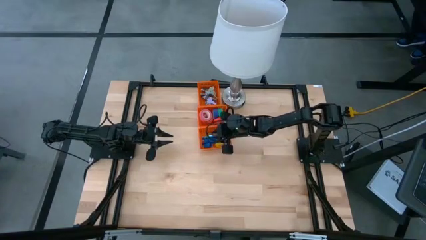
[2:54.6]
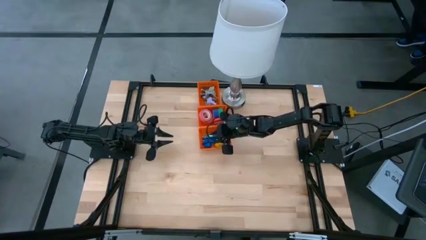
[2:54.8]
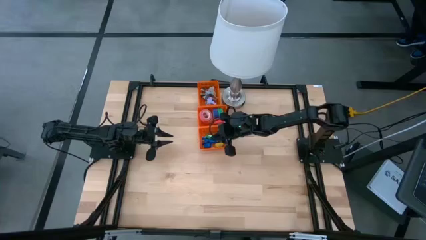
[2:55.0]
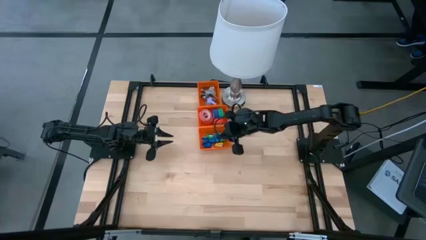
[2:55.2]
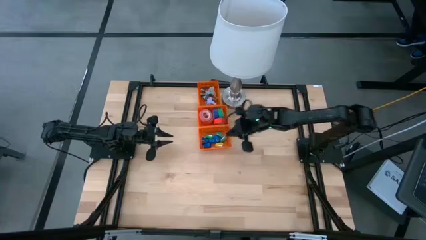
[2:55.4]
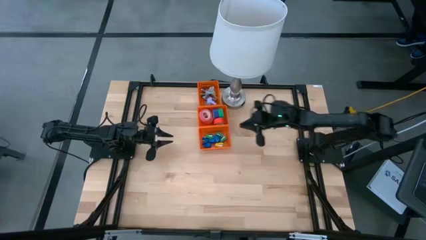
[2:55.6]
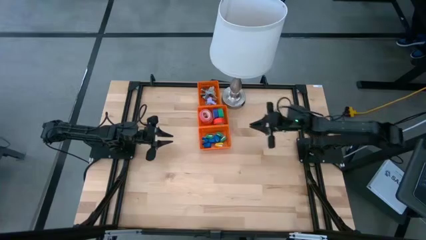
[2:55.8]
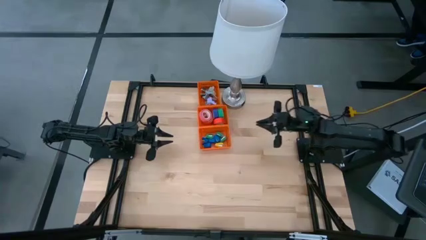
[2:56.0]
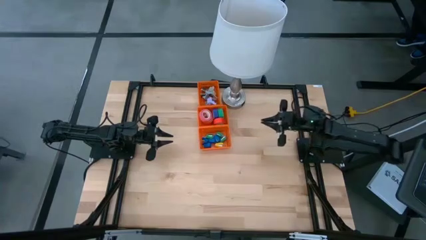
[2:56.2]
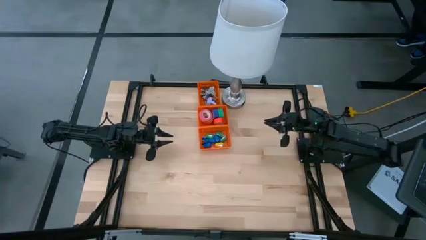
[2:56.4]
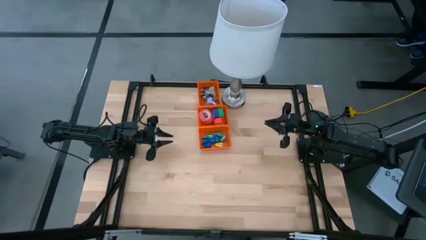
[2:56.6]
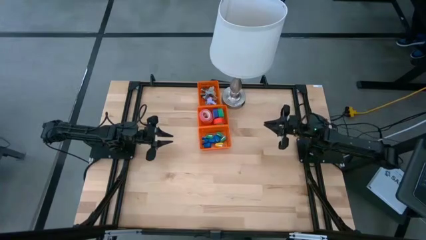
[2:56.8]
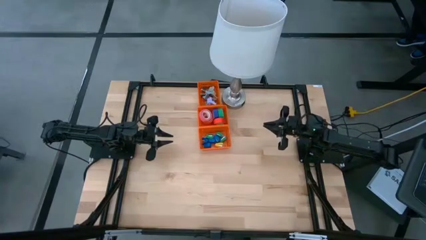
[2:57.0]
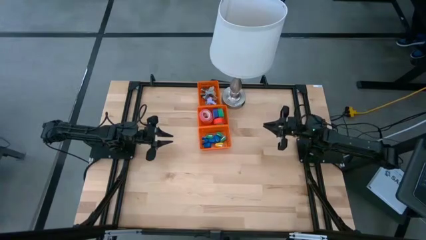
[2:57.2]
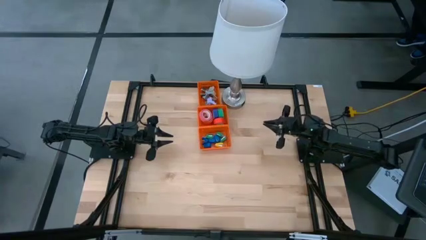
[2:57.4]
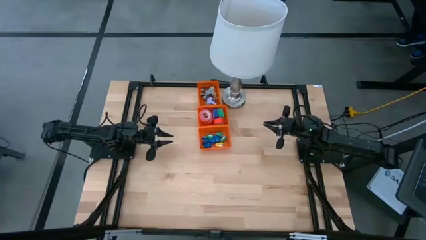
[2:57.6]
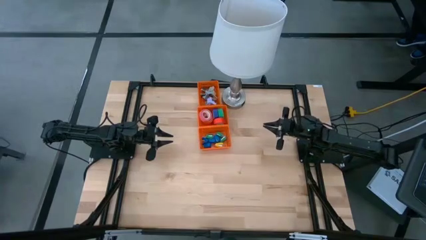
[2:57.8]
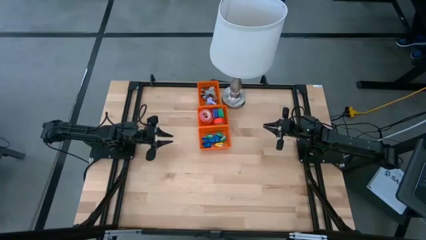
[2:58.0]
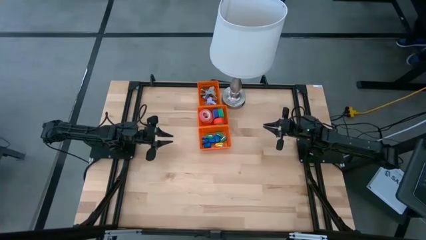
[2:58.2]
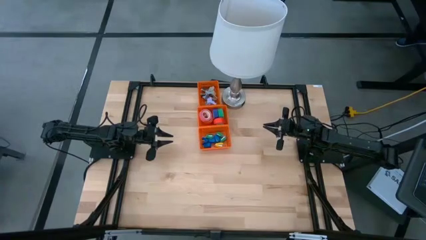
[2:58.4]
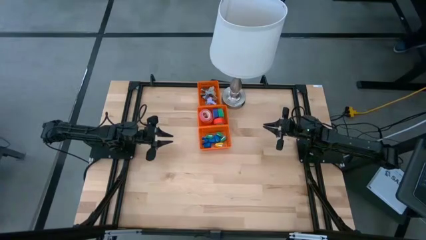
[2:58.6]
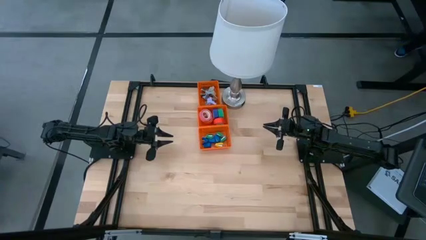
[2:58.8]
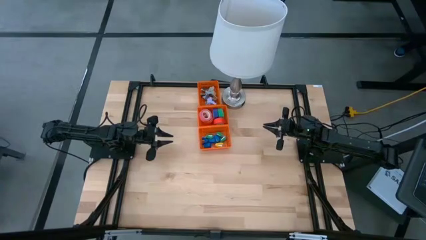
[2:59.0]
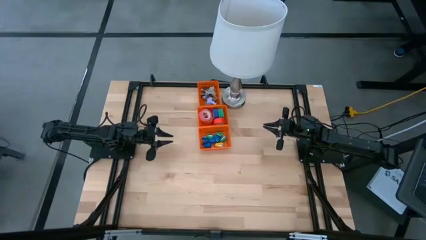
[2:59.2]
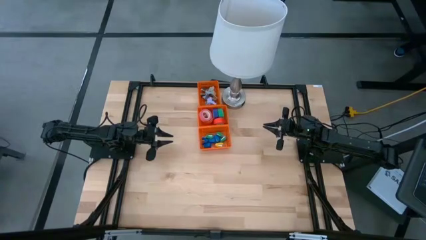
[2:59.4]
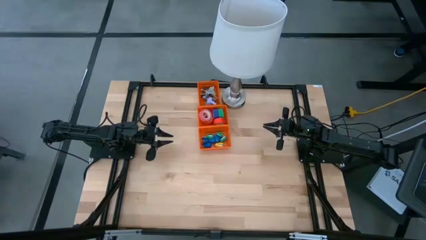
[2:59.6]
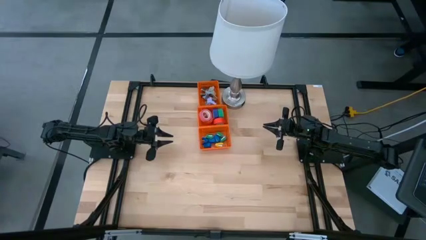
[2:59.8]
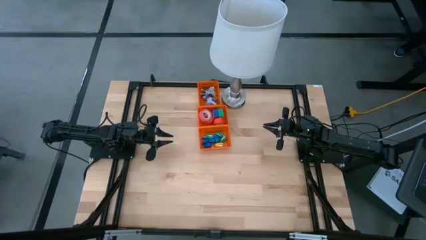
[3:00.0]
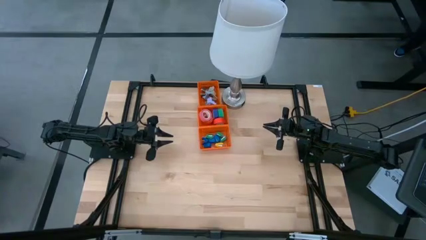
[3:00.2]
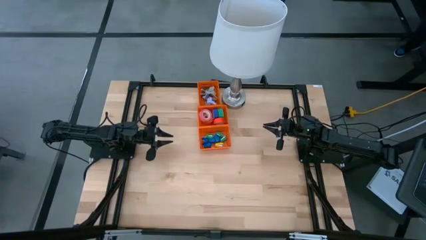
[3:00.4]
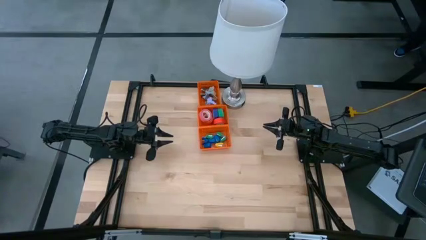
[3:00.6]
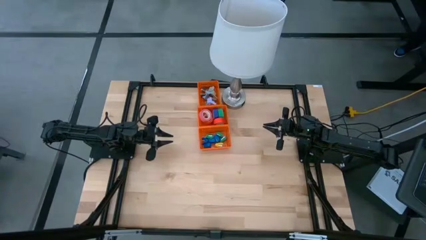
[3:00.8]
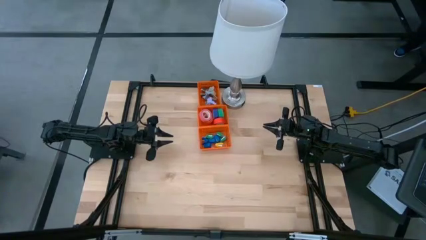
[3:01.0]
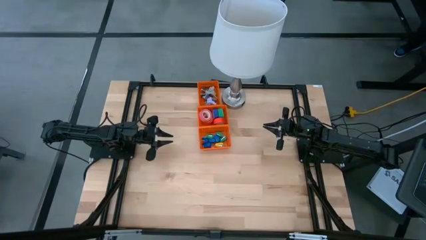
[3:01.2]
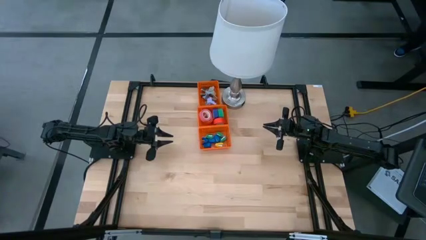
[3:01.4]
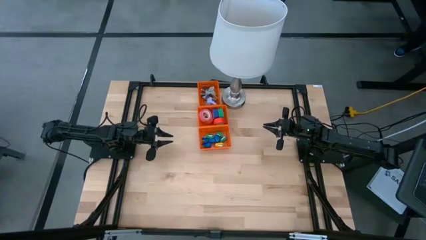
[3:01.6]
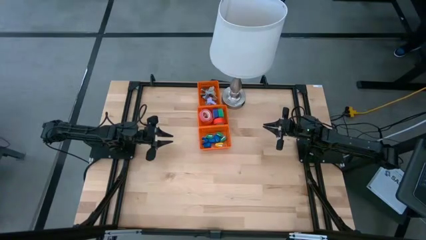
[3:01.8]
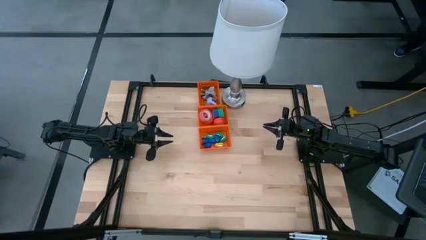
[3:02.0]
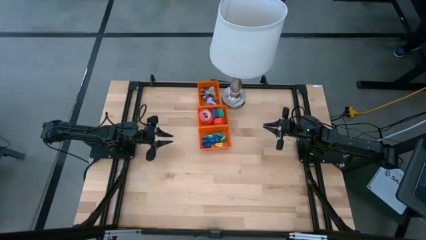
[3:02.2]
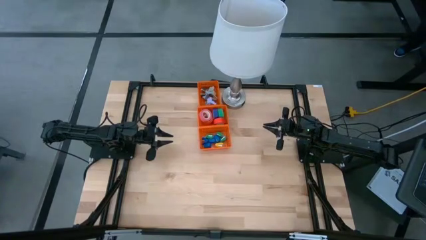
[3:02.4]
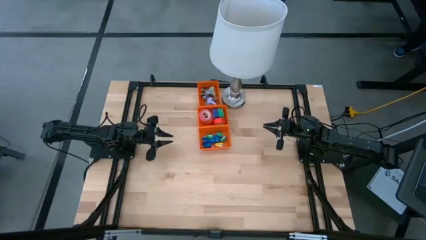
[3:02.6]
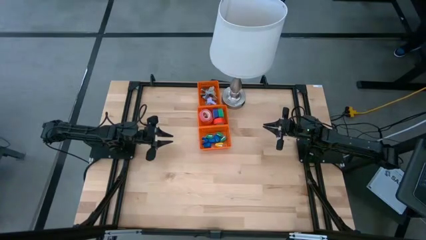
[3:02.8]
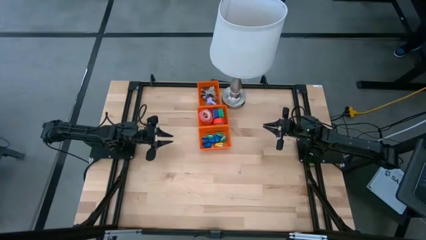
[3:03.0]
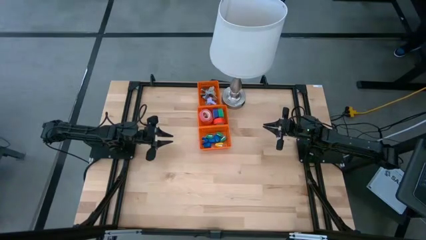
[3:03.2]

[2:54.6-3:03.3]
Task: Pick and place Stapler, Stapler remover, tape
Return to Home Position

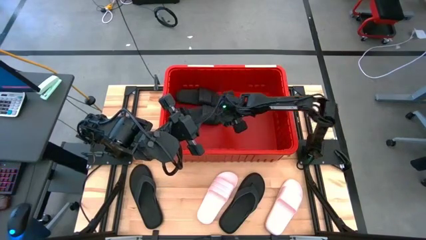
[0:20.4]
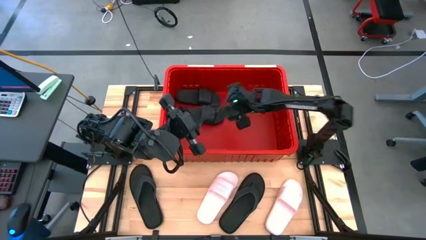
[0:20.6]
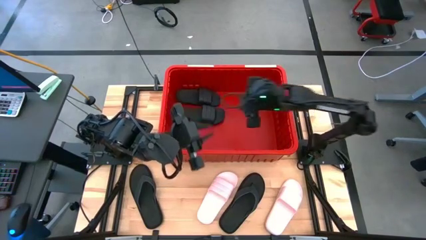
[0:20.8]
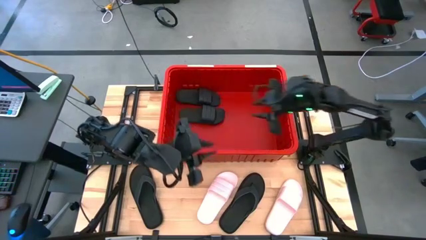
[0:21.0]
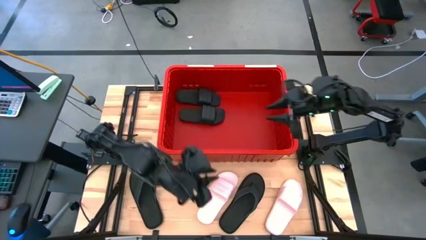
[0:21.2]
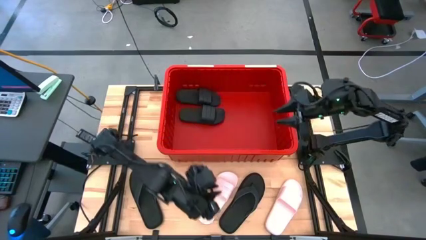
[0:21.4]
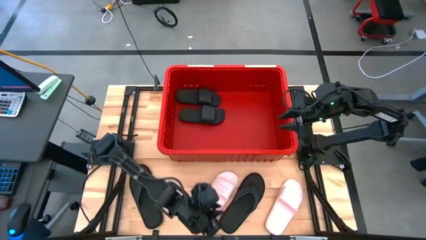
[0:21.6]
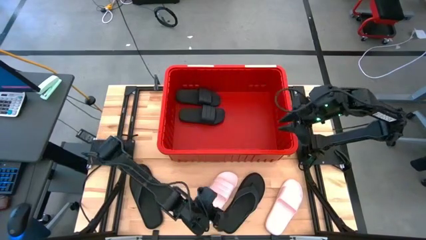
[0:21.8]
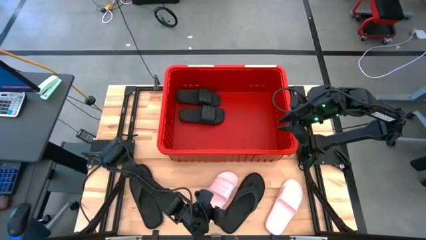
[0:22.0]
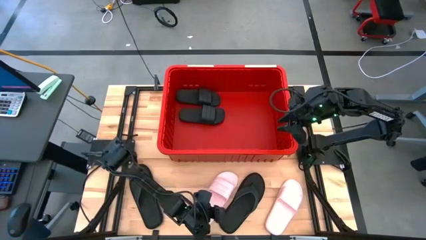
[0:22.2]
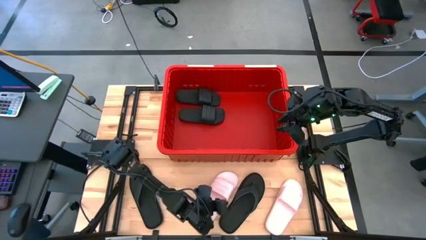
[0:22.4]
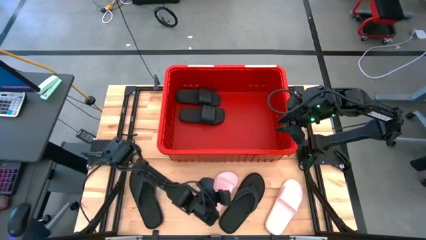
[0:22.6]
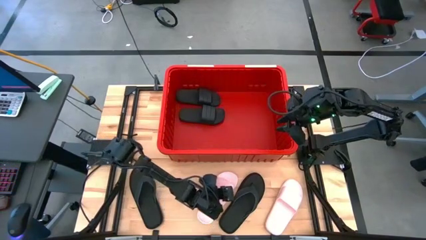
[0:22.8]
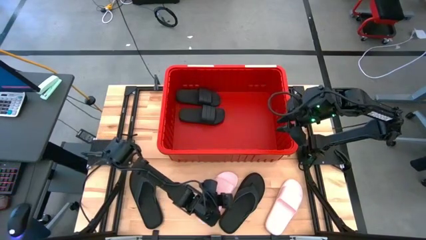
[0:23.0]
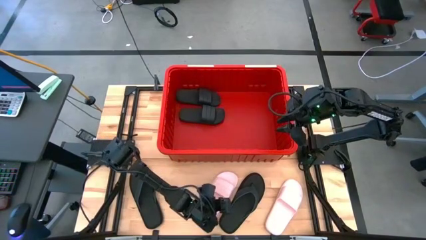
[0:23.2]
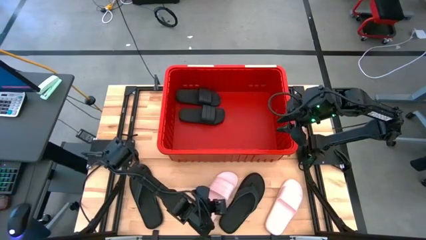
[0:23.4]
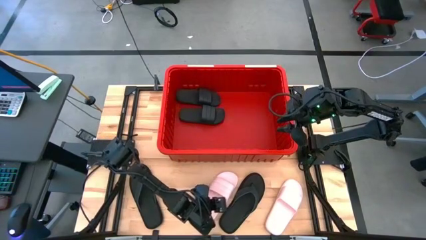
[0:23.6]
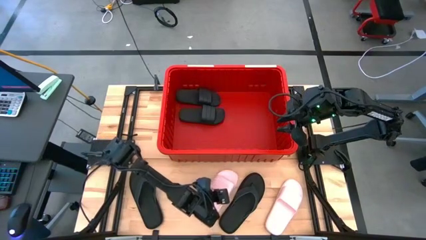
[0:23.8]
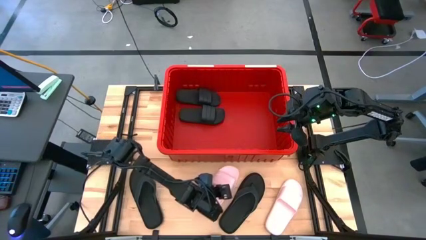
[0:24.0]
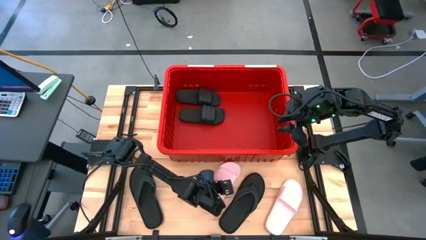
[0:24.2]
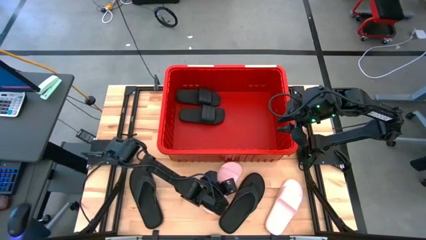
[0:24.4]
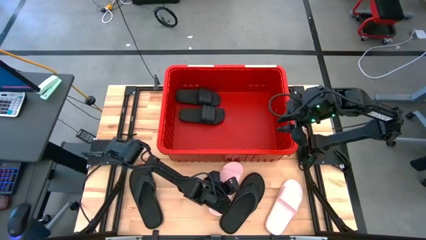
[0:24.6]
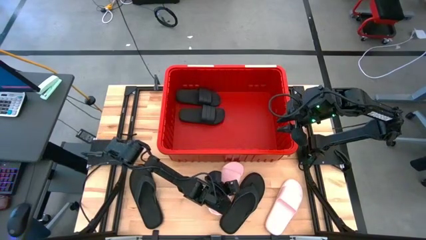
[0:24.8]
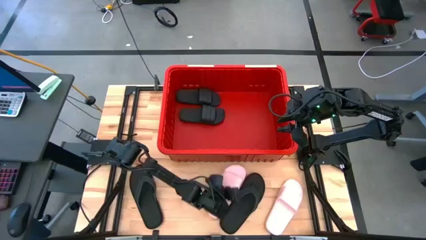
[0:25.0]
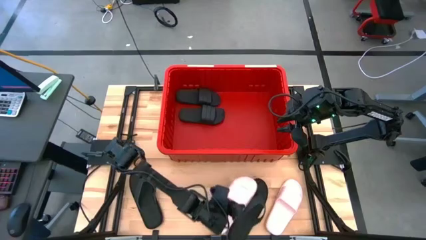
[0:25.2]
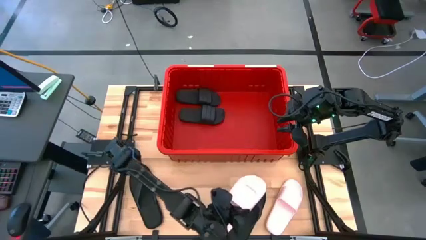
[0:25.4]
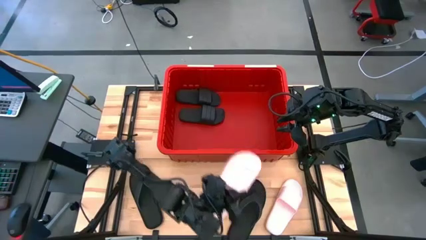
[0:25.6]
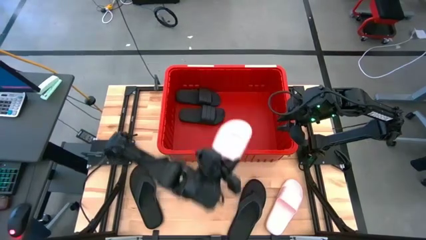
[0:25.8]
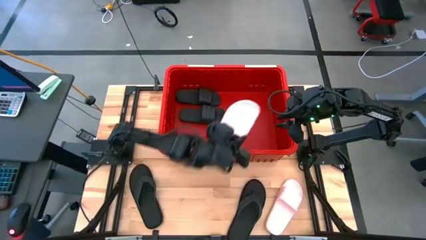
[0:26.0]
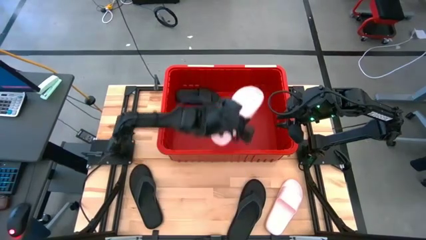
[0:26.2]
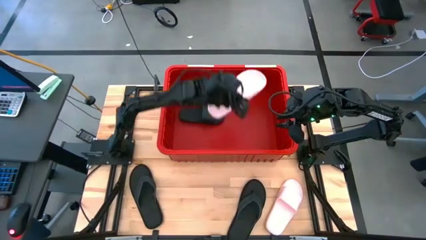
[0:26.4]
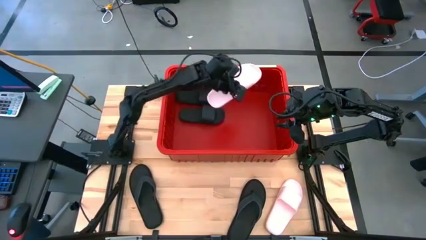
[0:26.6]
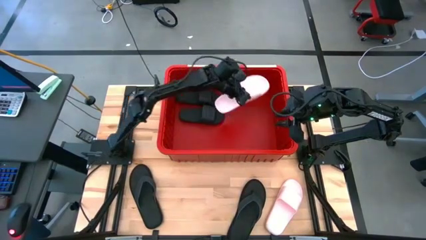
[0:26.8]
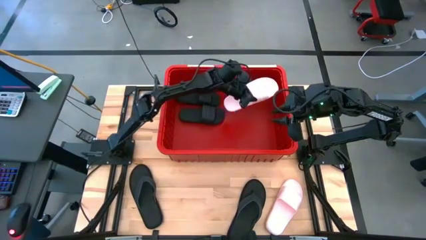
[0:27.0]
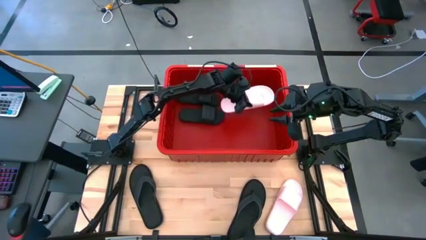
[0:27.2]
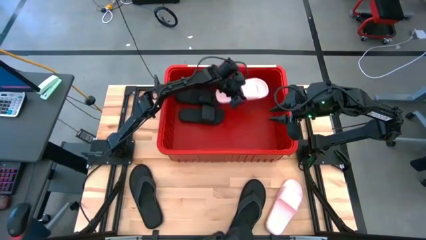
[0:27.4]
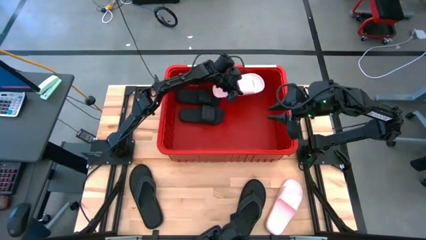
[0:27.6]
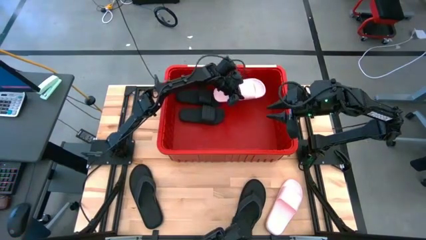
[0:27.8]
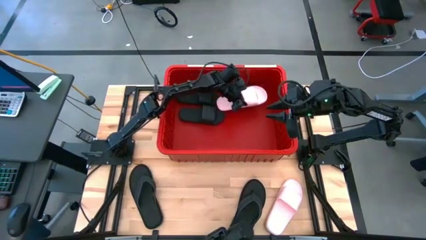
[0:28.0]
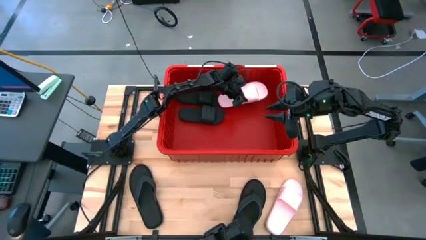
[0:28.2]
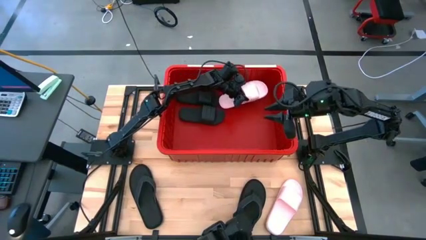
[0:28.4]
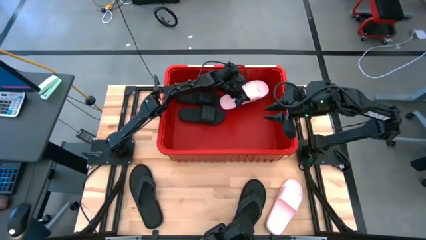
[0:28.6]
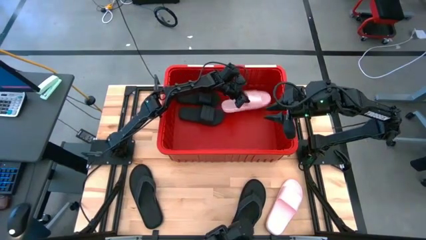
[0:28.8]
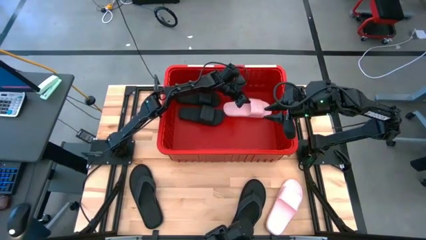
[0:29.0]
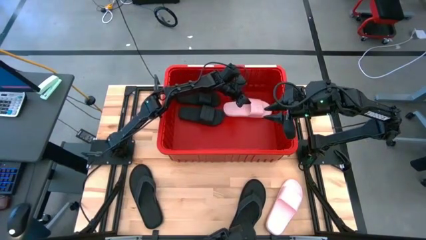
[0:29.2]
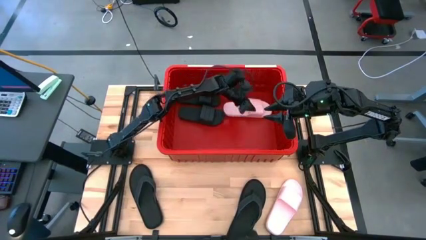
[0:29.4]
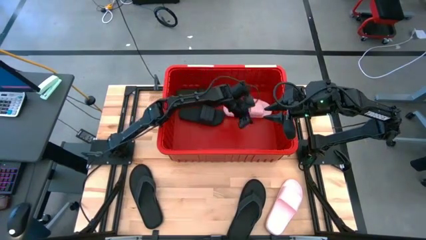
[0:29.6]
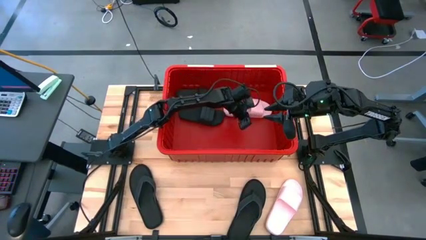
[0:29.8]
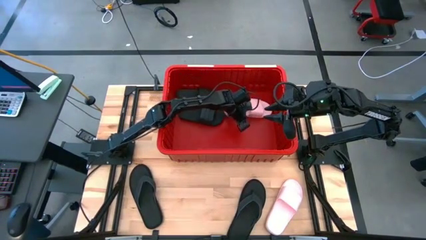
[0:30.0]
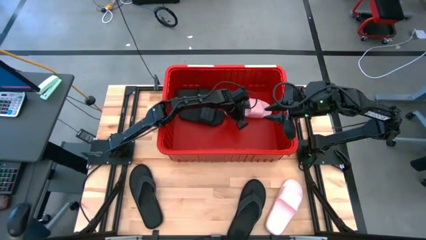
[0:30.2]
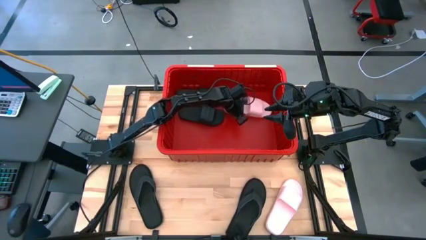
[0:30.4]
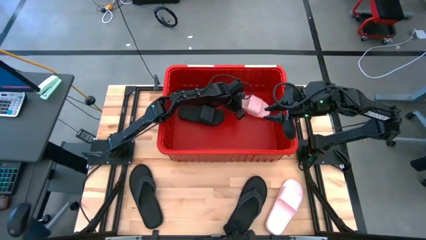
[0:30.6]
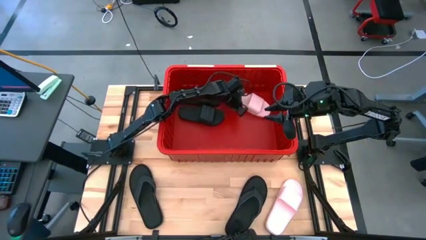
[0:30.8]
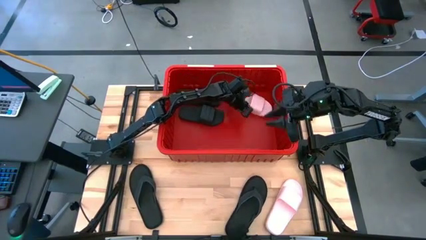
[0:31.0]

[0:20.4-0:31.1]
Task: Pick and place slides into bin
Put the left pink slide into the red bin
